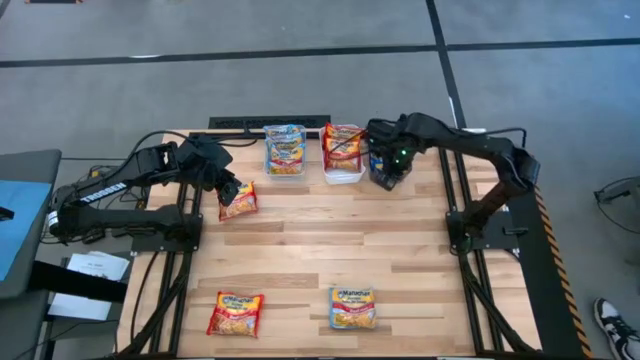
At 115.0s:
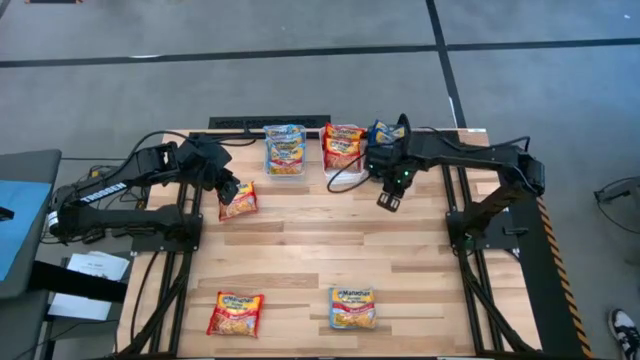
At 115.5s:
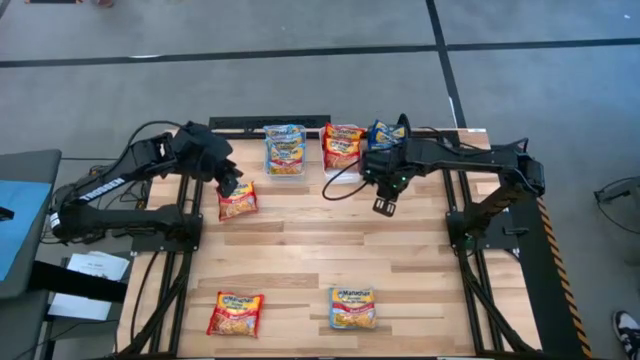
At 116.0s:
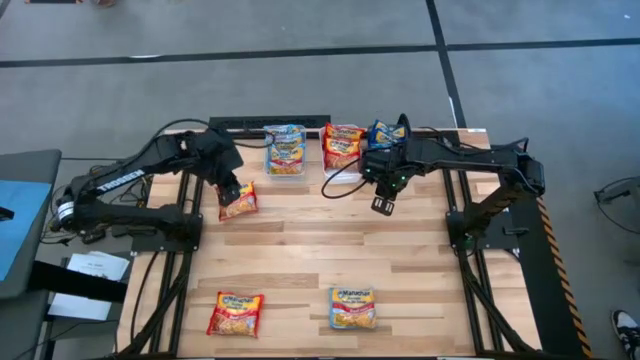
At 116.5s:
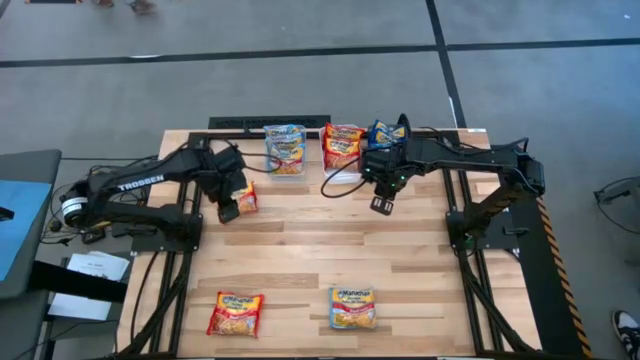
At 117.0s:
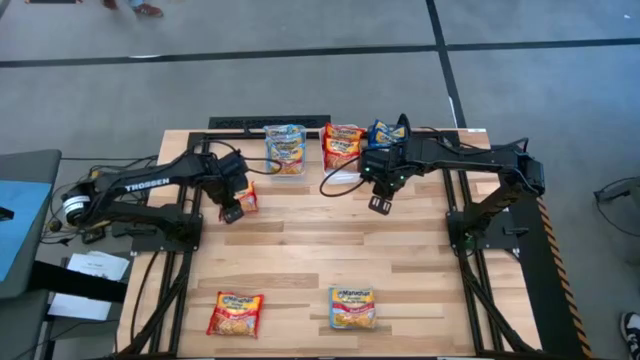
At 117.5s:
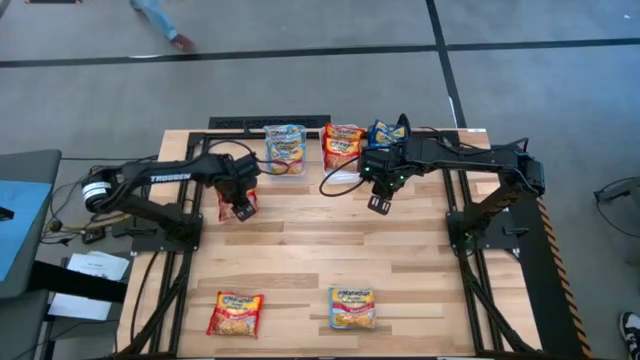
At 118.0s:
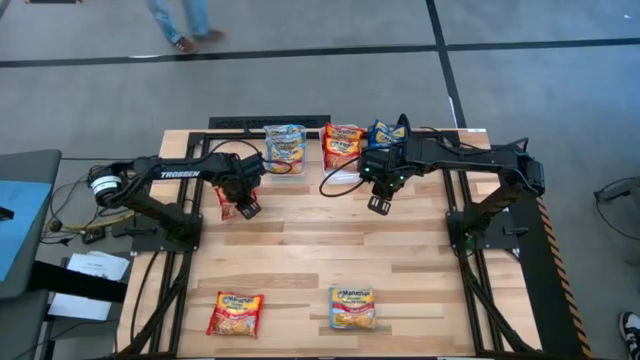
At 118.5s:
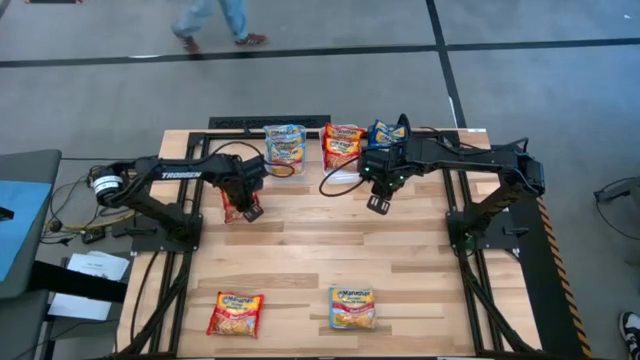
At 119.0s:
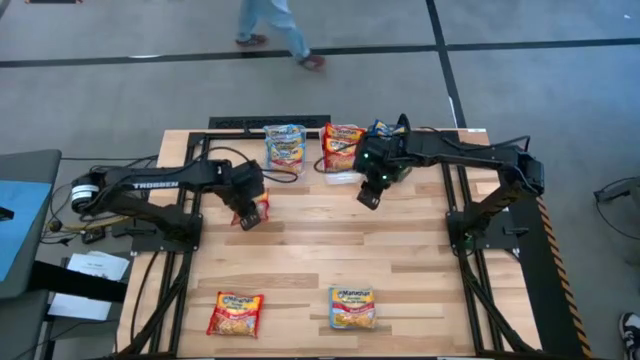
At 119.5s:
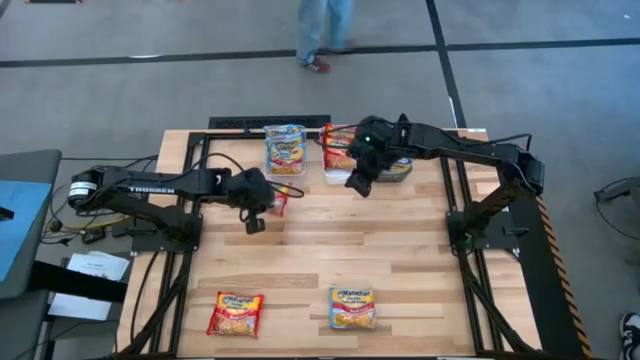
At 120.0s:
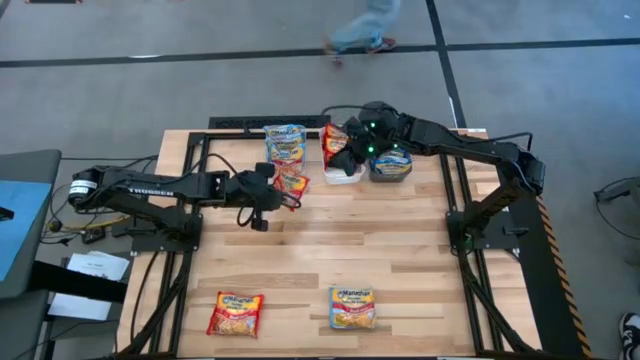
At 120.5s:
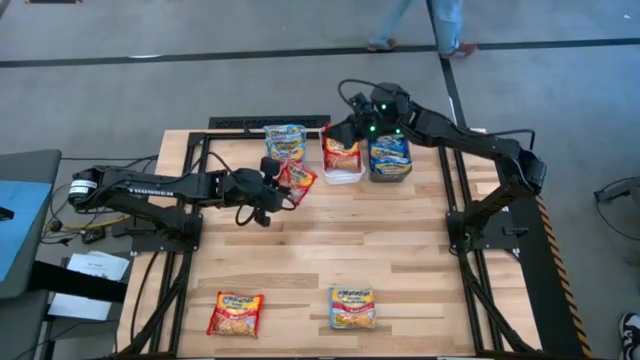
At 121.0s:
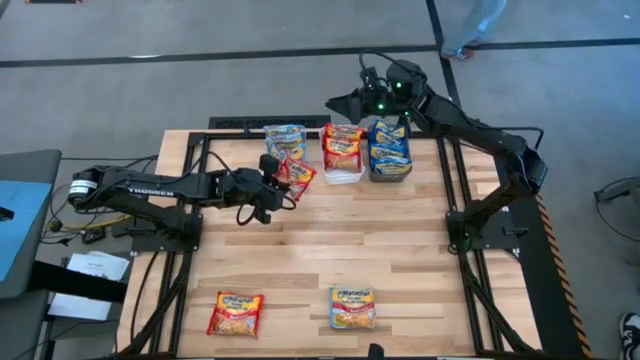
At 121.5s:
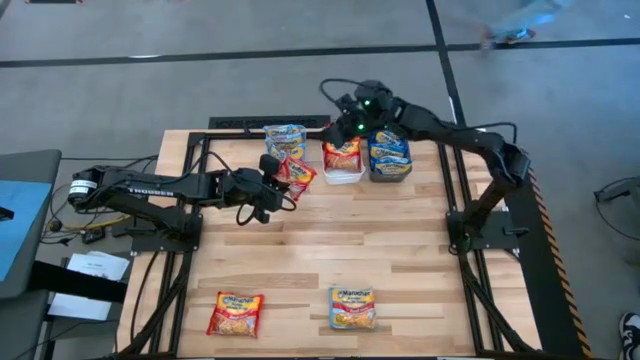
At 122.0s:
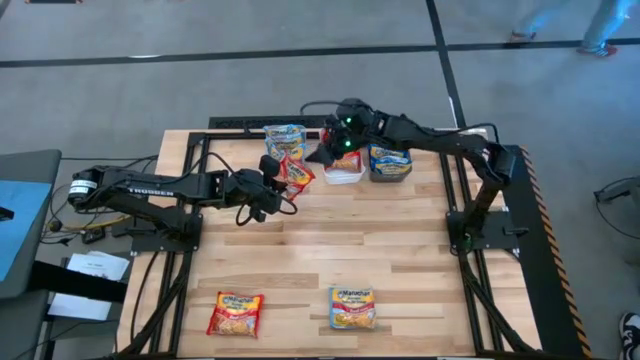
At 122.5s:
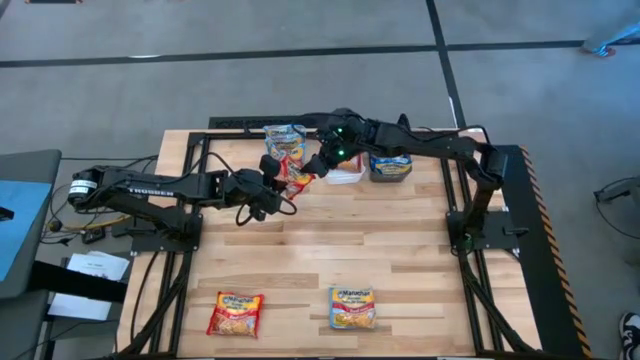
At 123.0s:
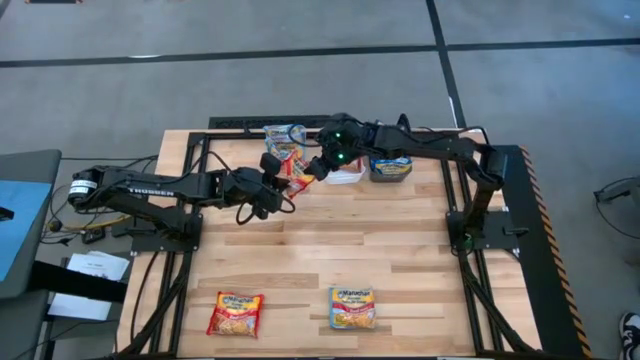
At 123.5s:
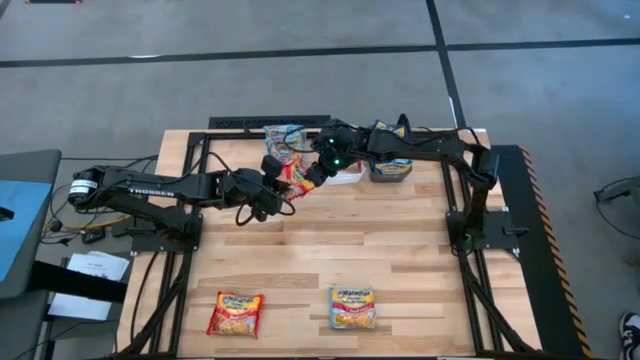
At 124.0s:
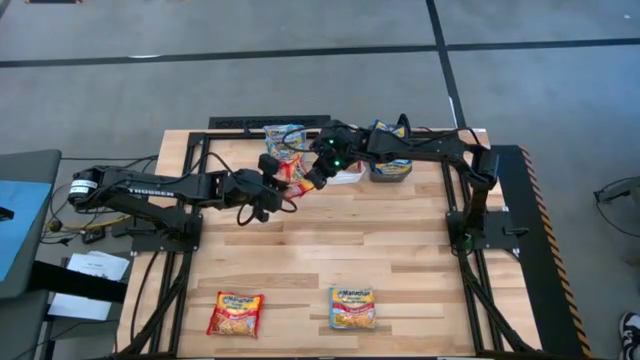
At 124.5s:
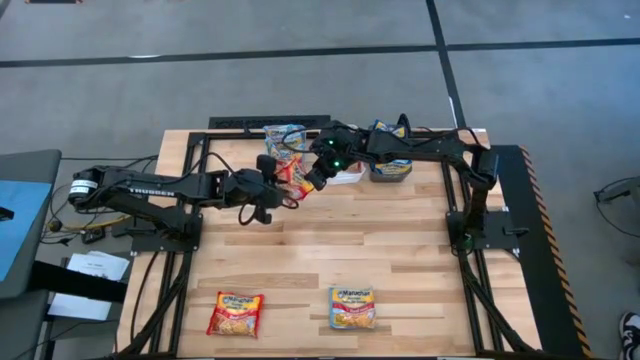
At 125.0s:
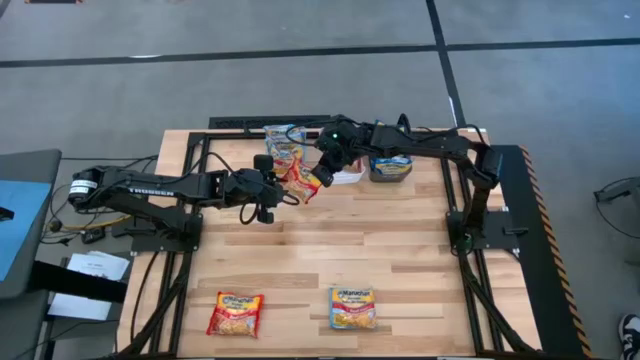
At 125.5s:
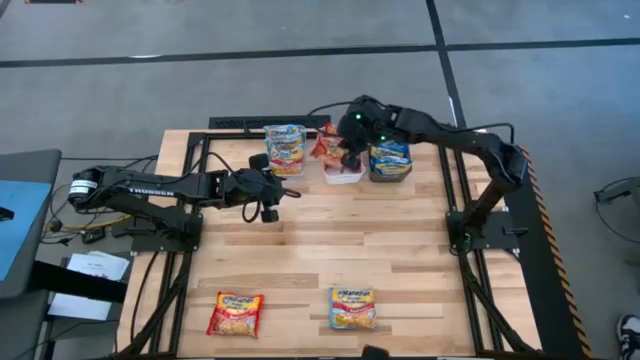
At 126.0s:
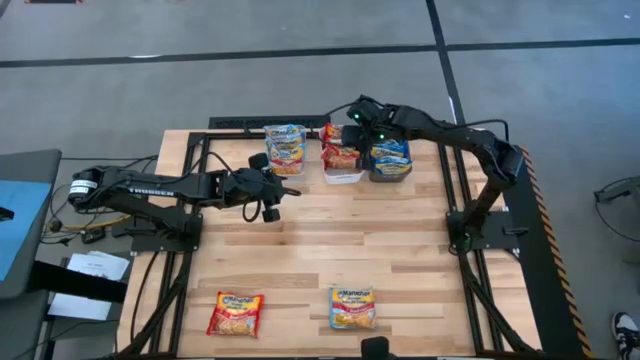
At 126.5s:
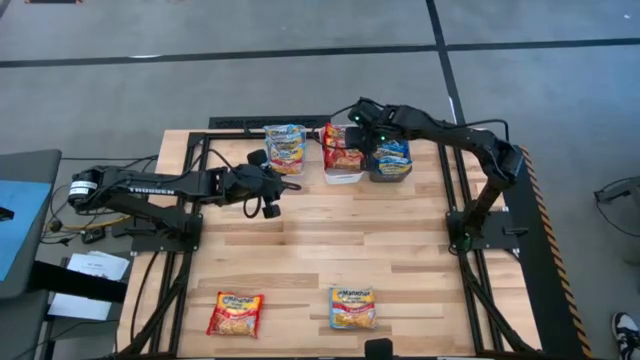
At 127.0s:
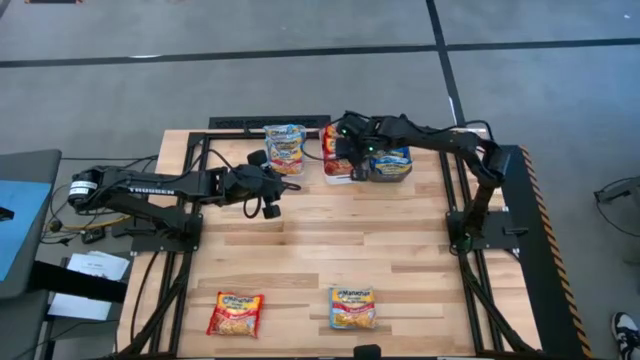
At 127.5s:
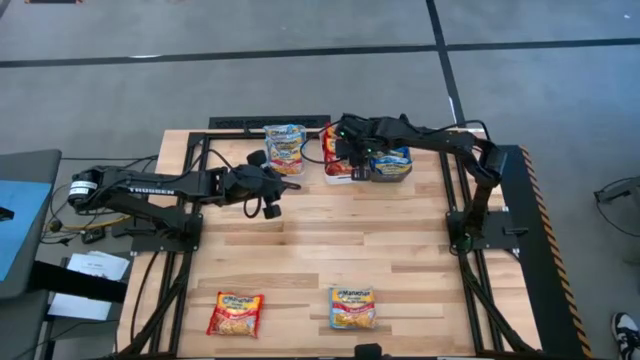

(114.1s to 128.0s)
Task: Sort Maruchan noodles
Put the red noodle pack into the white bin

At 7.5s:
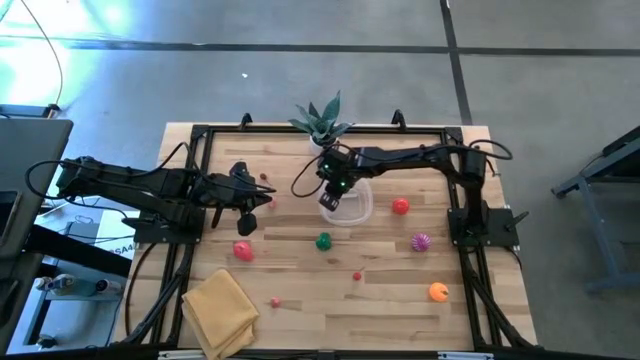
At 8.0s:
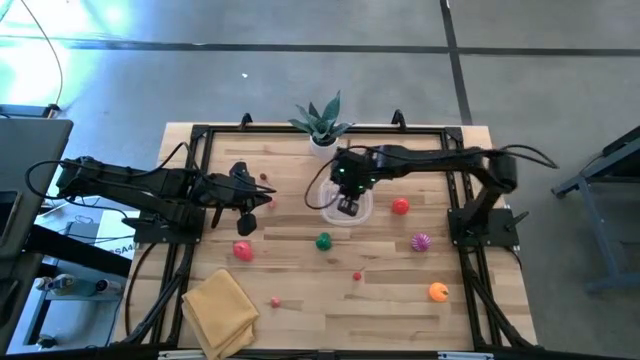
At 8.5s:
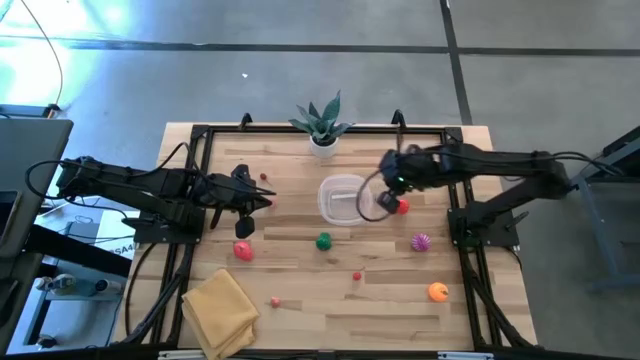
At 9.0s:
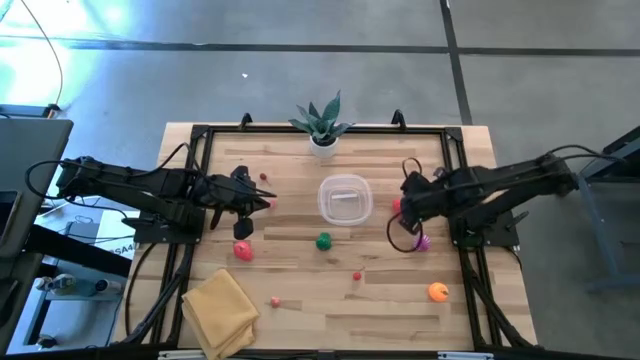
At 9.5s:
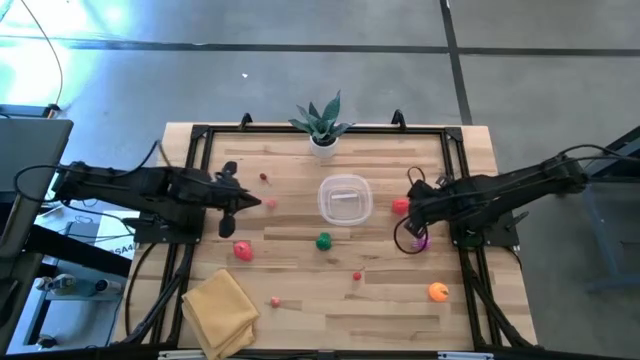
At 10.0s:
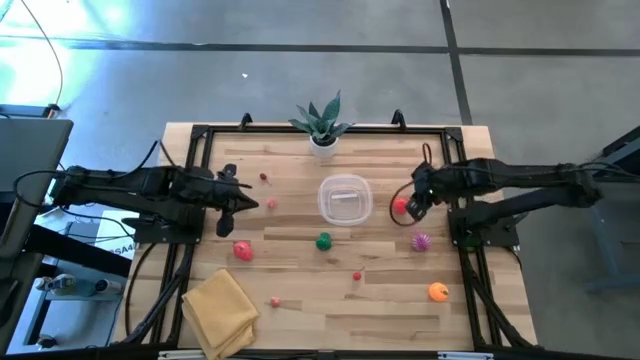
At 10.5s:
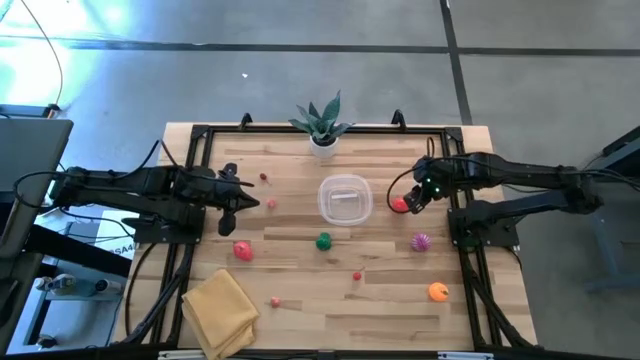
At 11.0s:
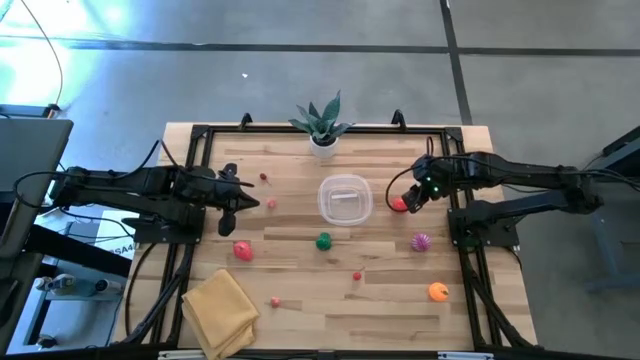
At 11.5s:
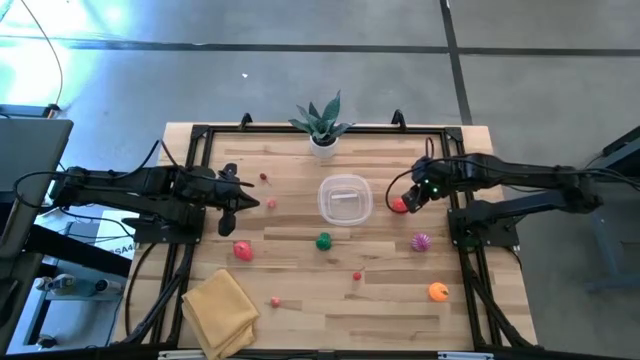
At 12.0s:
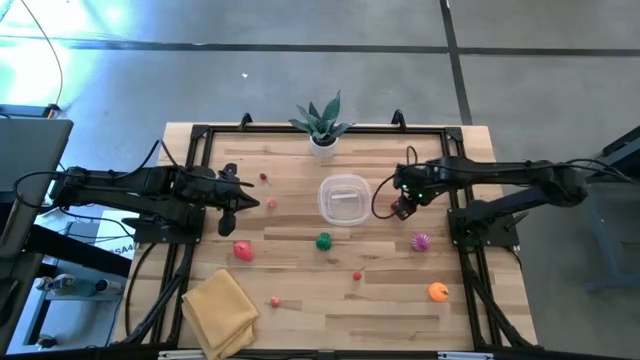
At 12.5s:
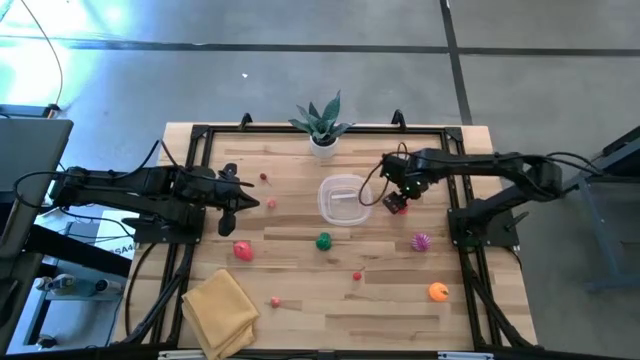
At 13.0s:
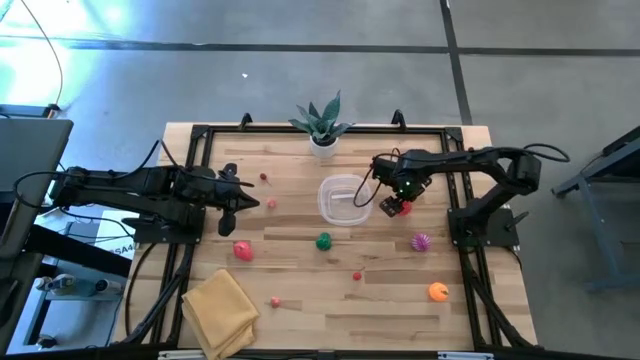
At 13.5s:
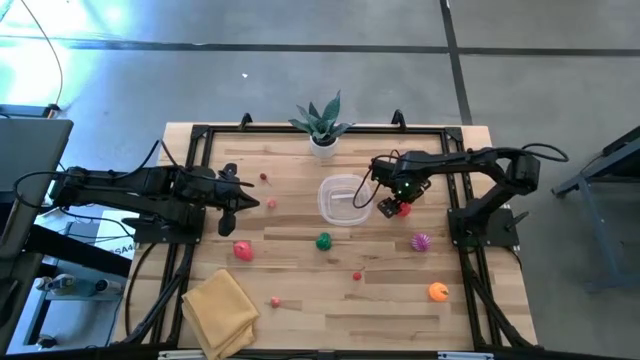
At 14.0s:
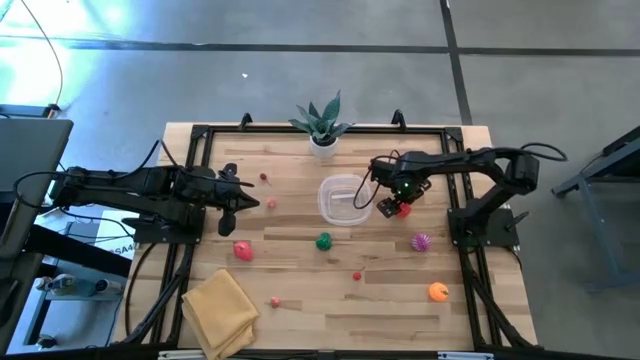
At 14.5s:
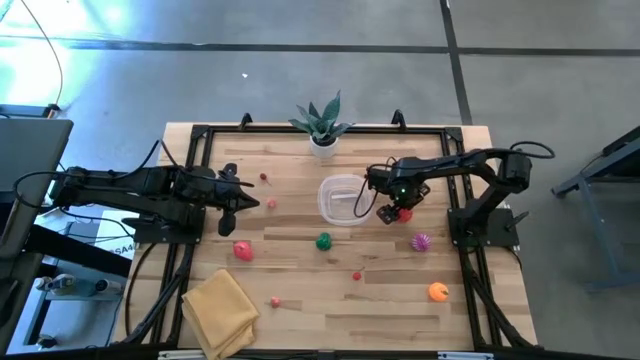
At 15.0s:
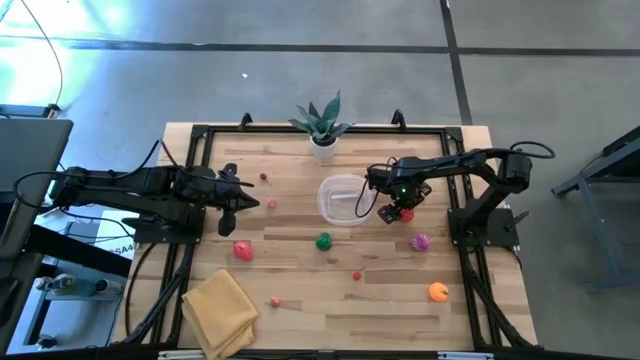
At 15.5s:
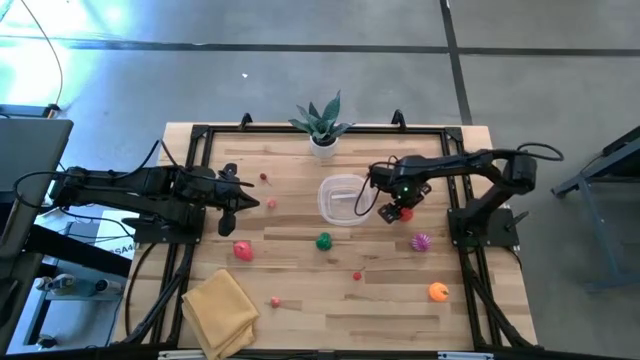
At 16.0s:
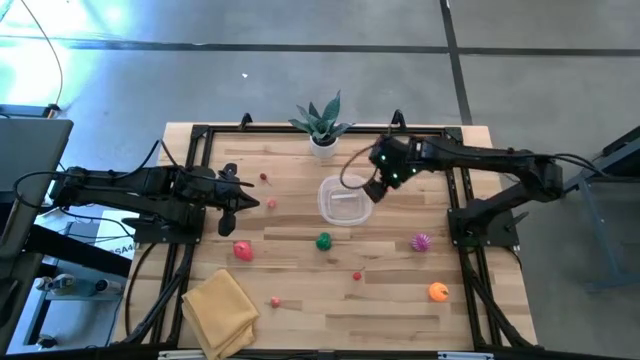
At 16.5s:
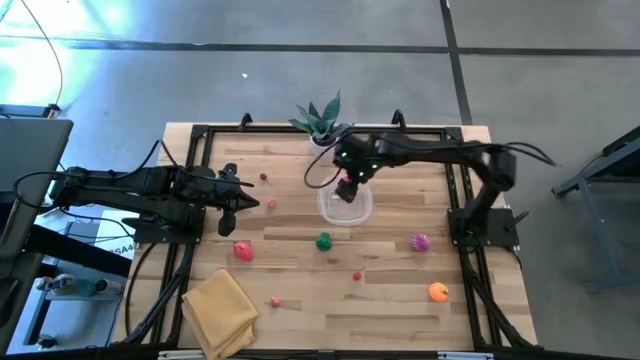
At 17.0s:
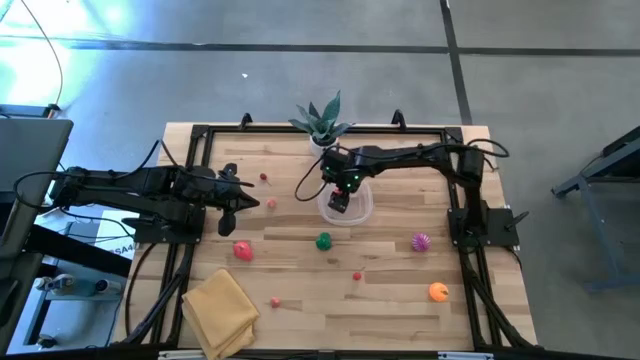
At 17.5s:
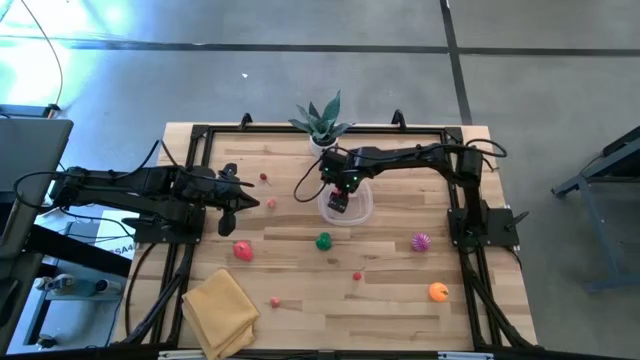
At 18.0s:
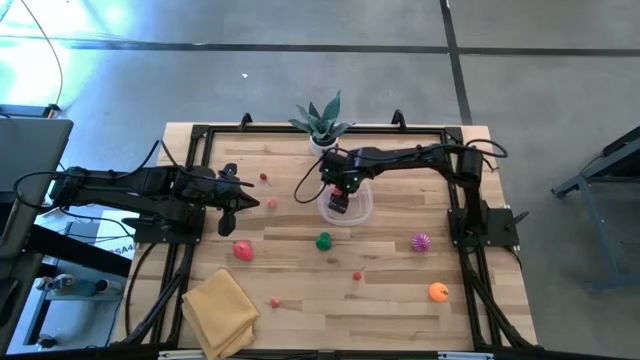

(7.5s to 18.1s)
Task: Pick and placing Produce into tupperware
Put the orange tomato into the transparent container
